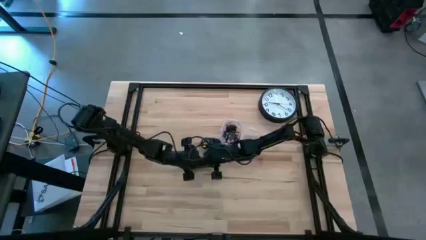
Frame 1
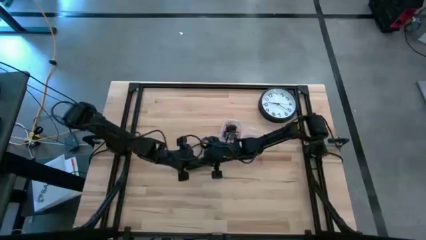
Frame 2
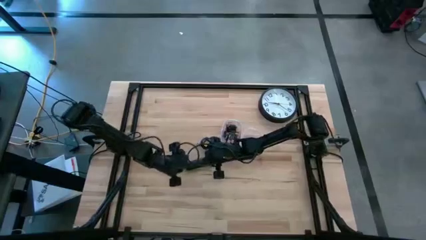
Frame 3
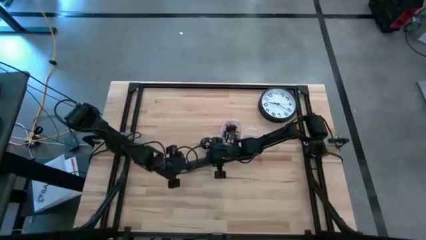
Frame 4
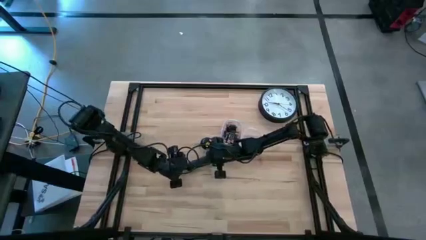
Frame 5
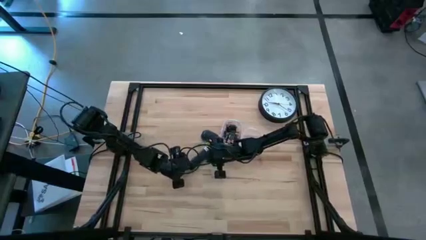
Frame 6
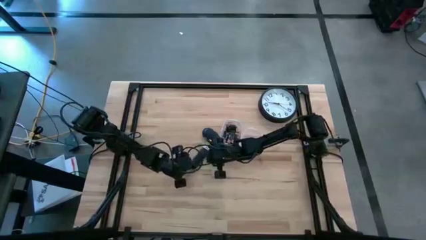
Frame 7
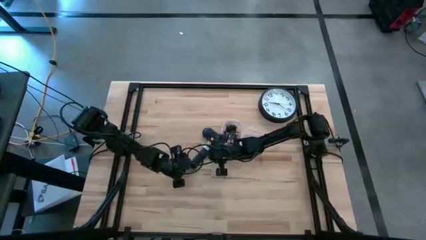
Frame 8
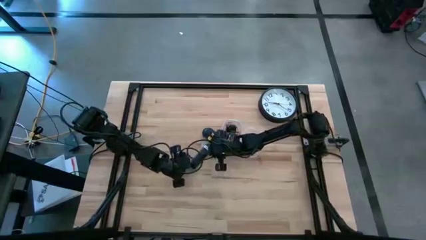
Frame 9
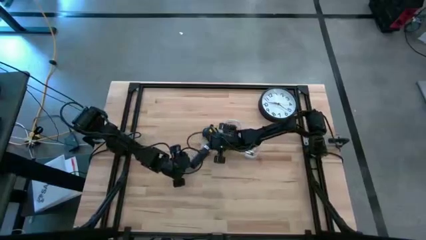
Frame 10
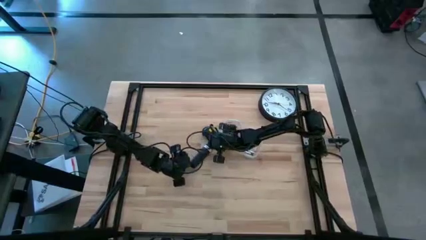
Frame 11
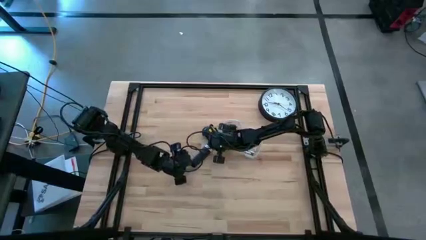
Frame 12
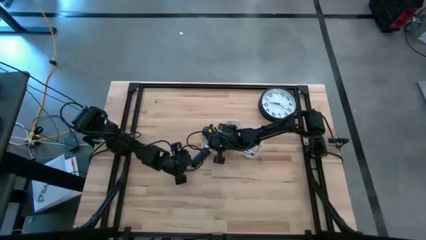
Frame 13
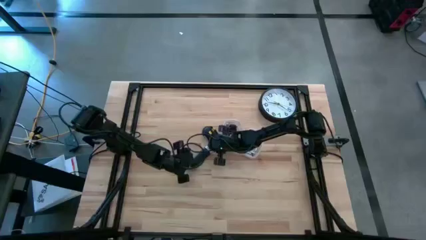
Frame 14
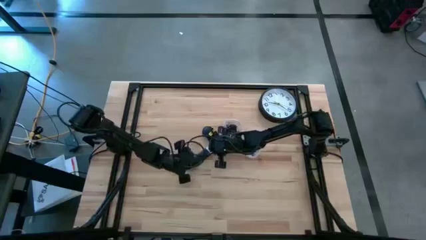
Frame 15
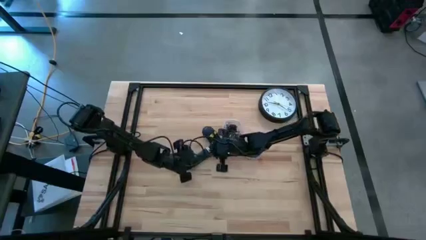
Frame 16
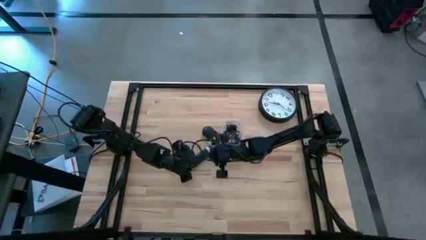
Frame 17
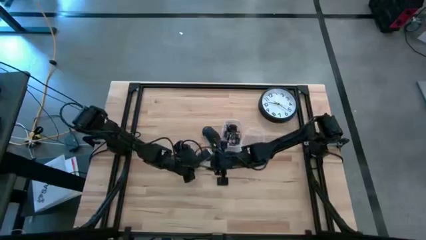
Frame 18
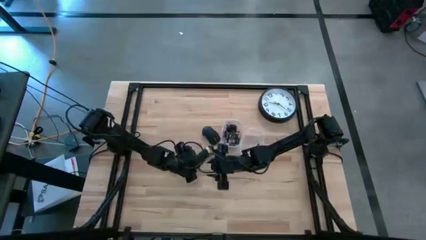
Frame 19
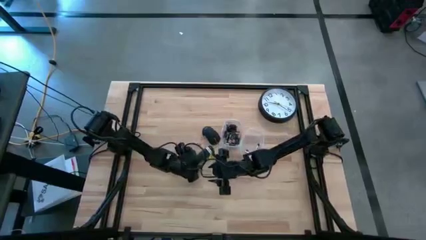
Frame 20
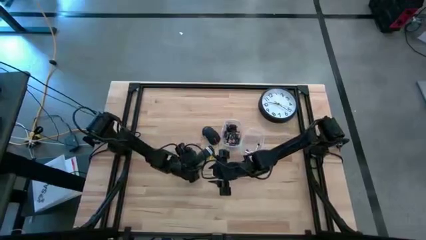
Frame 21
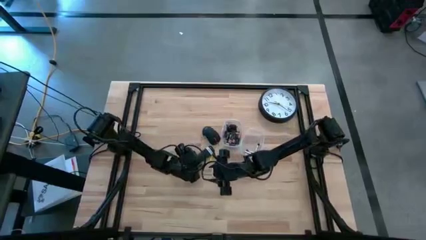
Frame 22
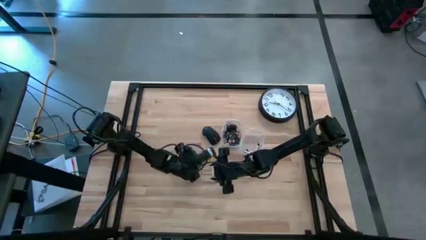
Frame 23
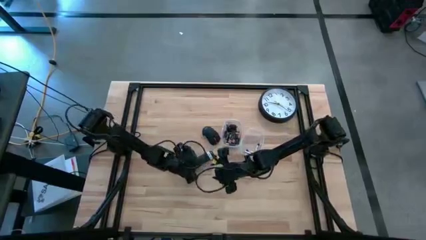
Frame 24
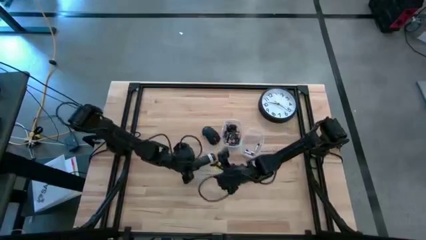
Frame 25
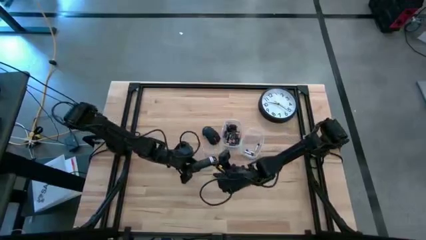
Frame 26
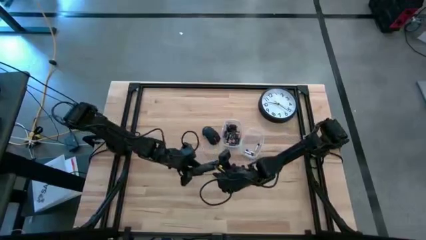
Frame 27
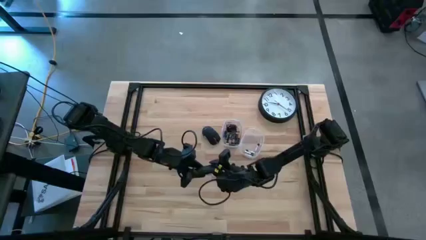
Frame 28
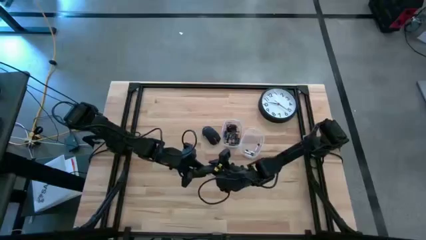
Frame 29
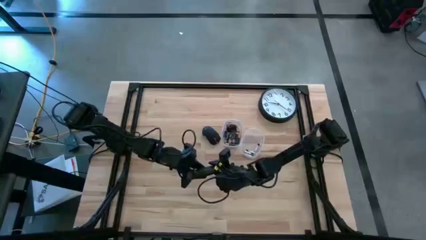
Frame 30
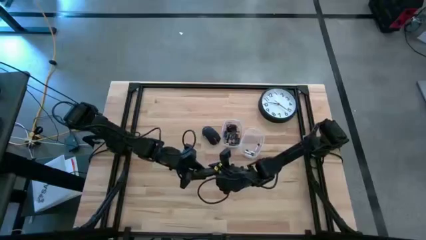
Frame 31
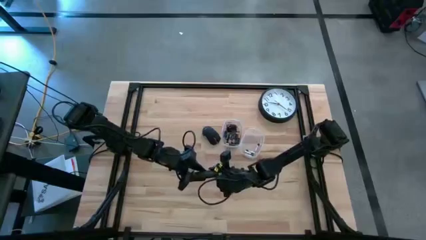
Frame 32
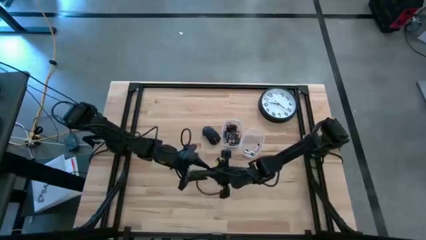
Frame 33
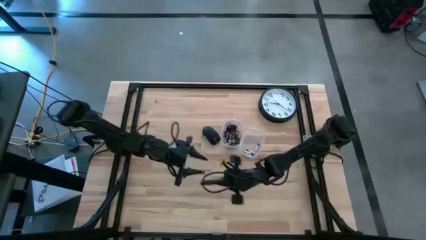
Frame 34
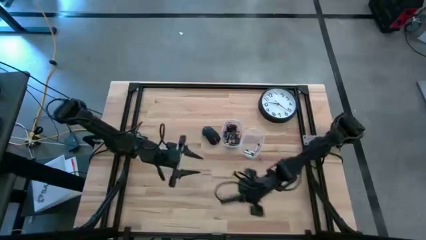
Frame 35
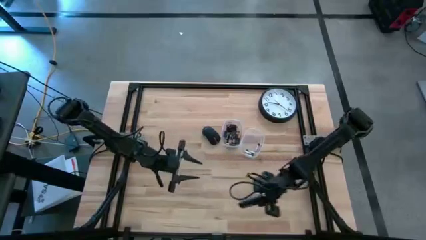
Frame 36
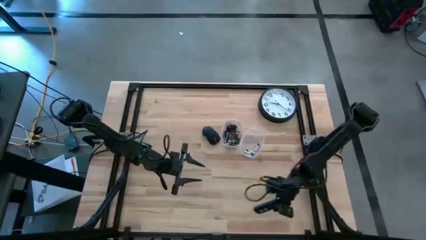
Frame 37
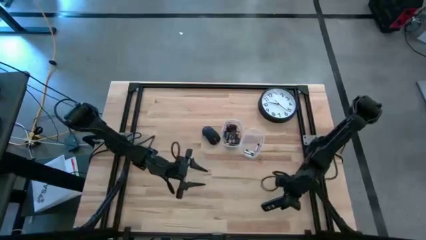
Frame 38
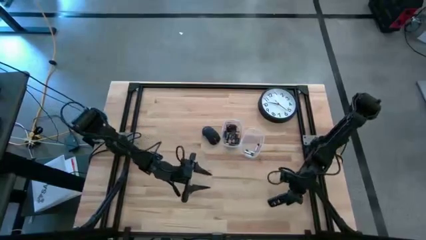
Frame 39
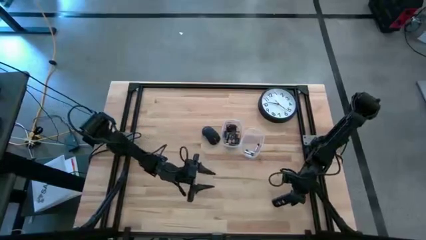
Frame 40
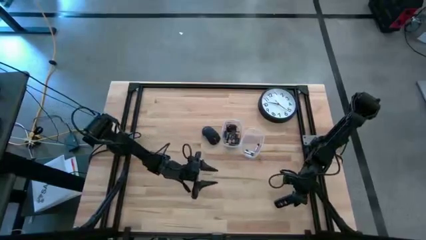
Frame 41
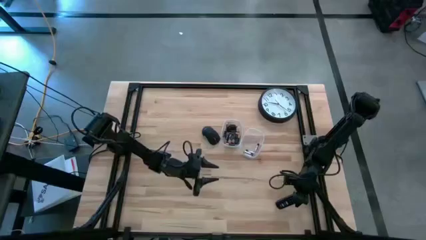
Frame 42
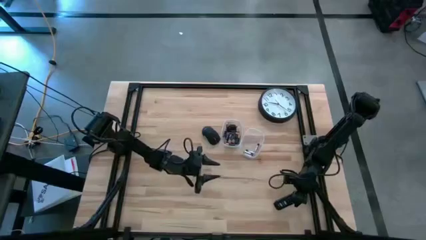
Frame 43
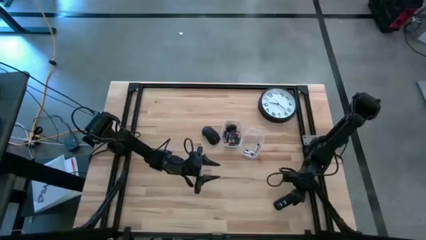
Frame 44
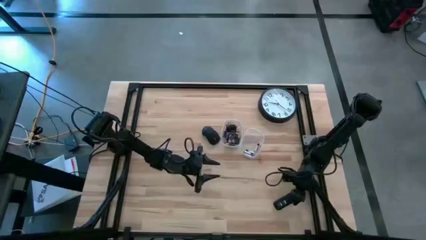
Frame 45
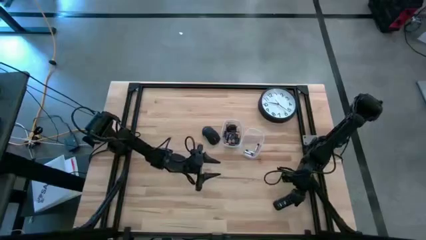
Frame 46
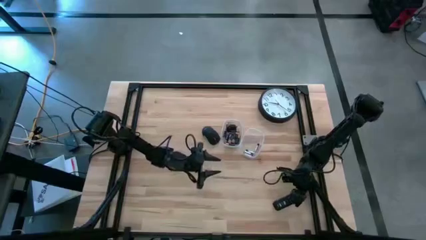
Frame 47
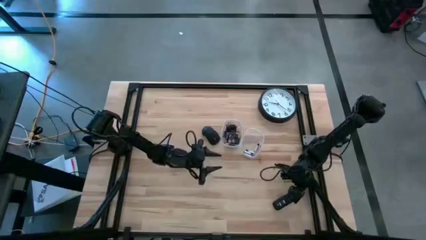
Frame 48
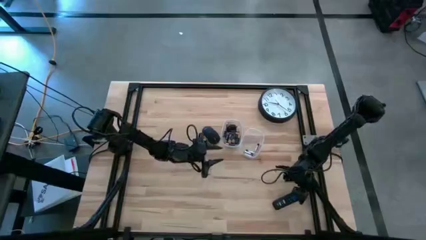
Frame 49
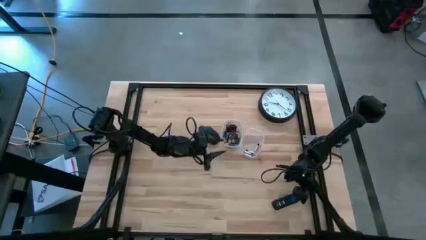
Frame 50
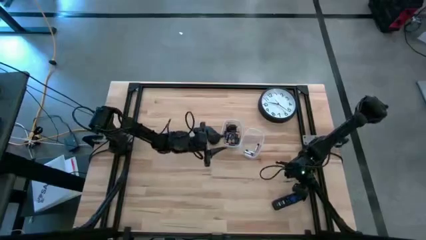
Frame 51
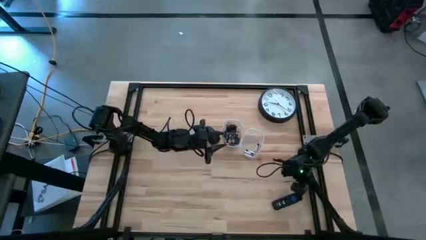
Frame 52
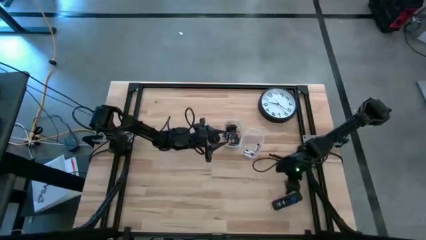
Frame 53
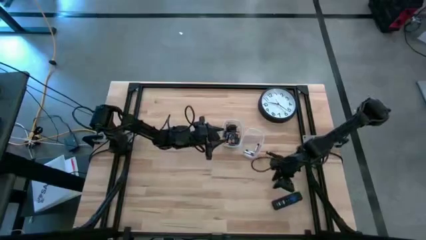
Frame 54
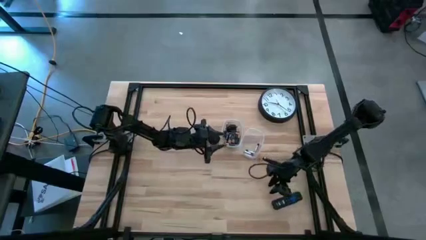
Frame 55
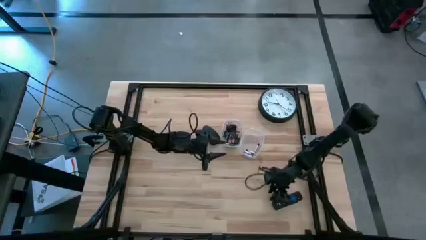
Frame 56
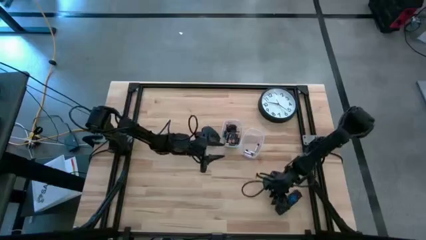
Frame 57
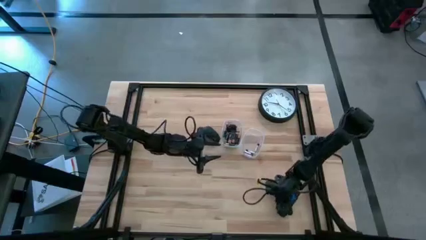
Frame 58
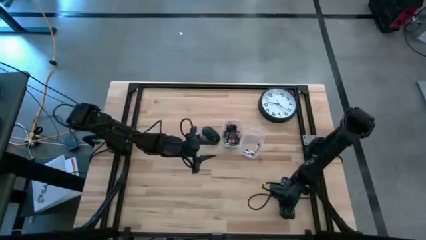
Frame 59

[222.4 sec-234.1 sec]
Task: Insert battery
Move the remote to the

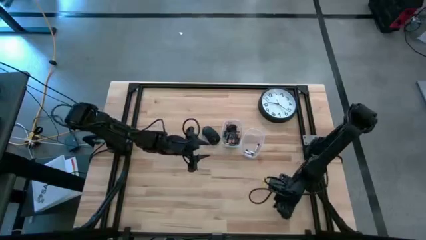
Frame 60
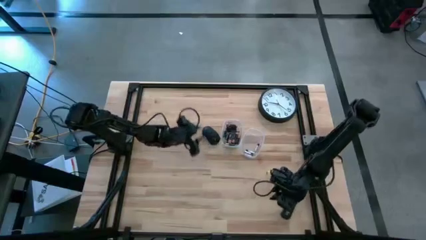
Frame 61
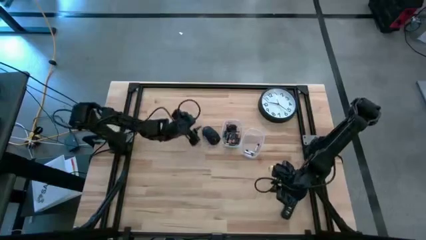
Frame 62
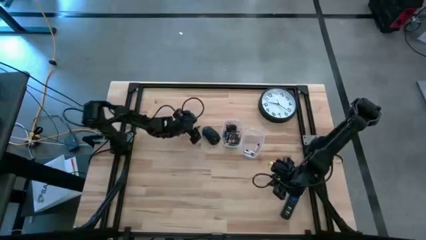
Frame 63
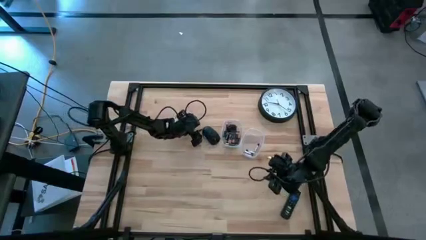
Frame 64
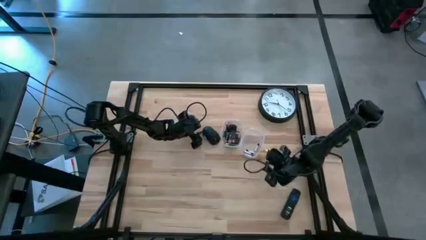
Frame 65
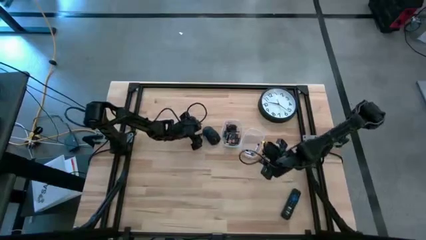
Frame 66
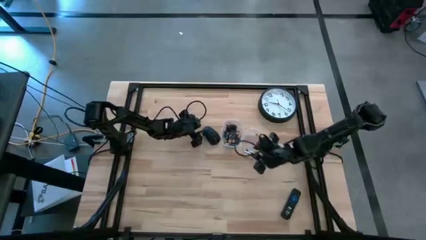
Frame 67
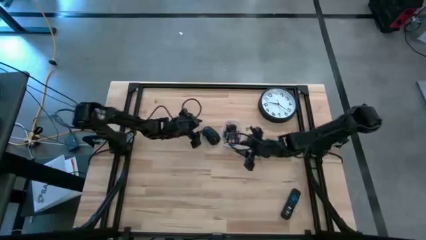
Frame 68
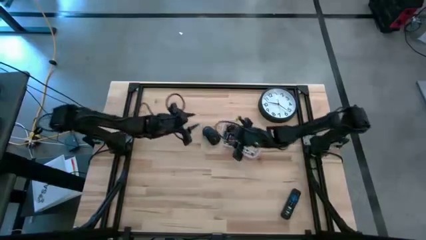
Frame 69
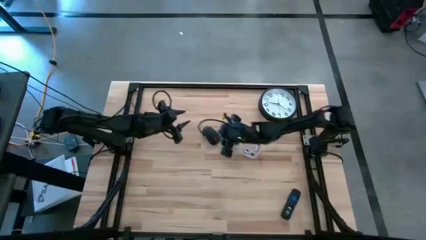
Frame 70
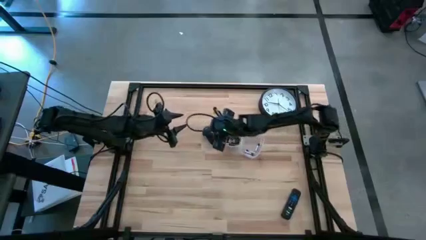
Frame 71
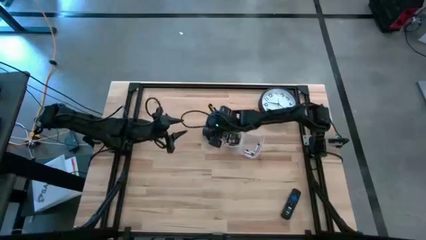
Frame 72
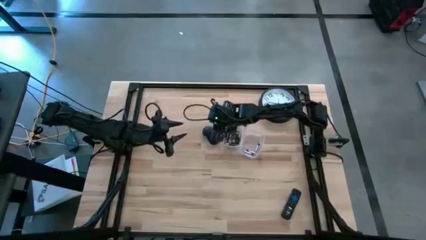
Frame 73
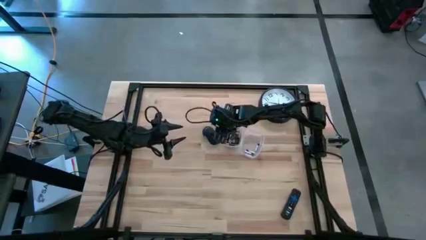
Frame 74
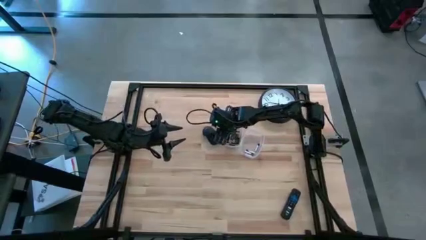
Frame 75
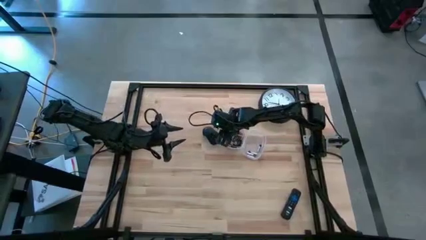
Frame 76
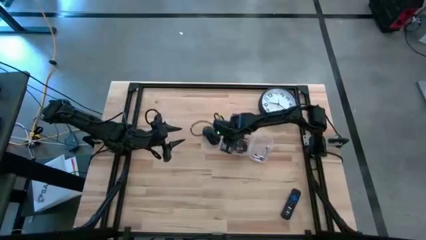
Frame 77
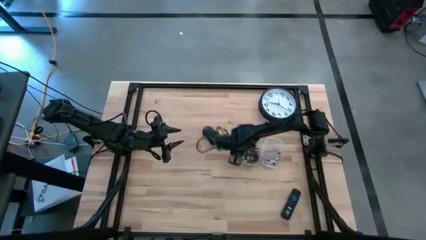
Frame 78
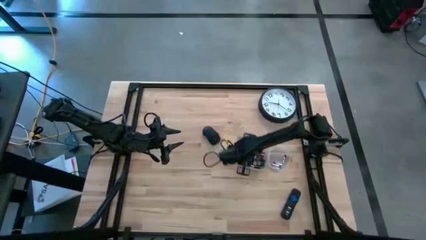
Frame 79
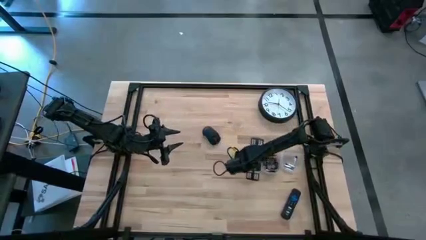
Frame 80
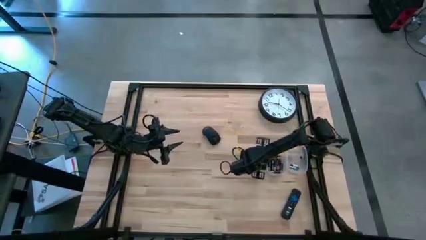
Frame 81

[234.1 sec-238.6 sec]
Move the transparent bins

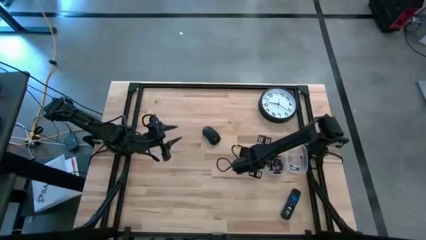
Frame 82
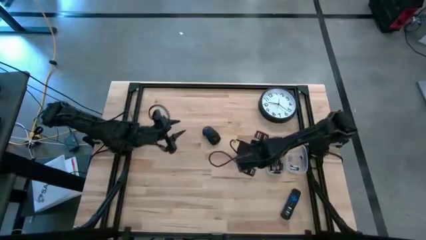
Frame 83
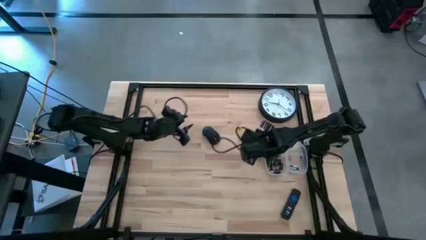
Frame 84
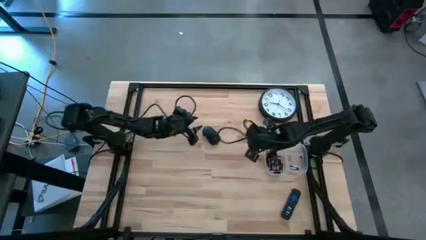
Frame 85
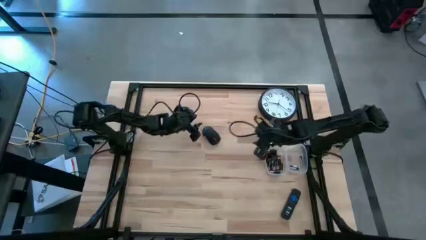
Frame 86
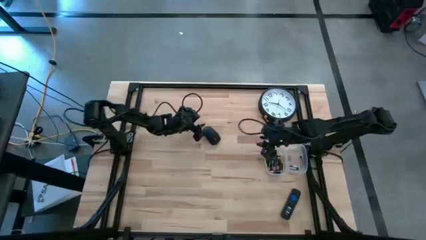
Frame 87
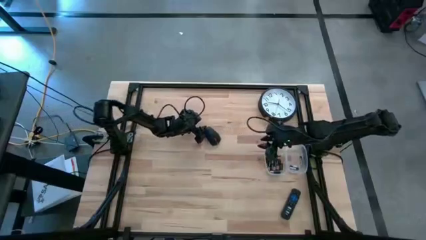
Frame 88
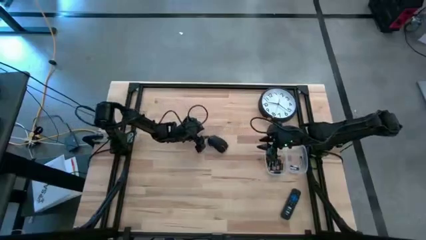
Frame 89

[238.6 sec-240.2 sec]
Adjust the wireless mouse
